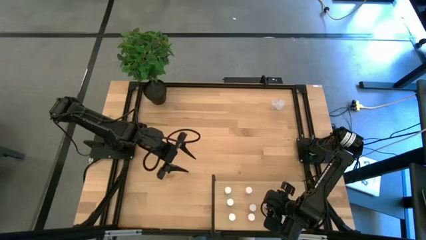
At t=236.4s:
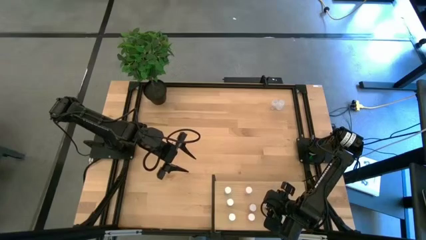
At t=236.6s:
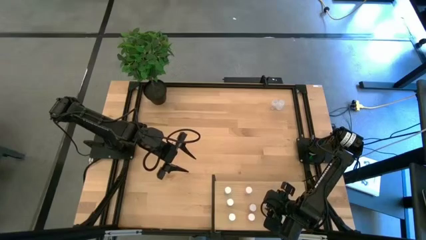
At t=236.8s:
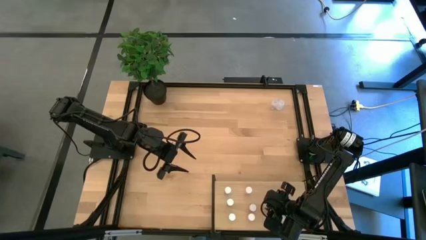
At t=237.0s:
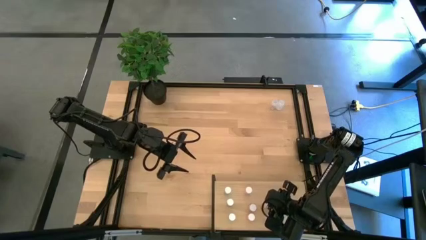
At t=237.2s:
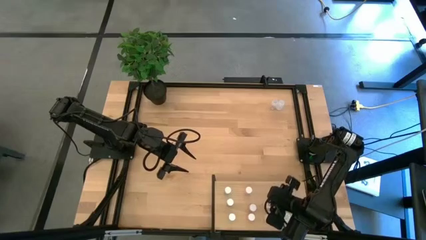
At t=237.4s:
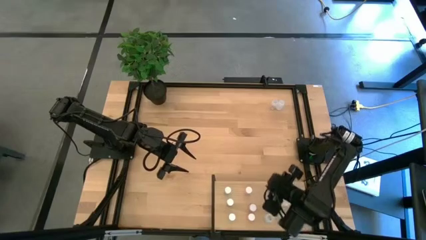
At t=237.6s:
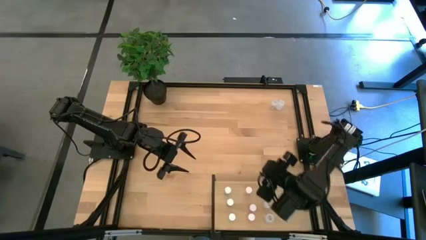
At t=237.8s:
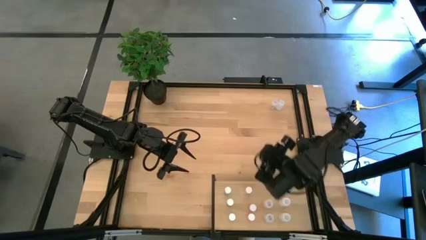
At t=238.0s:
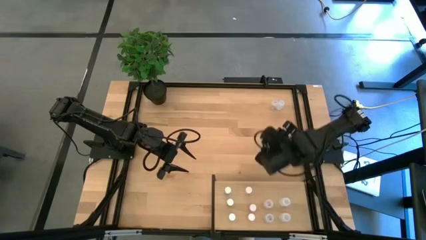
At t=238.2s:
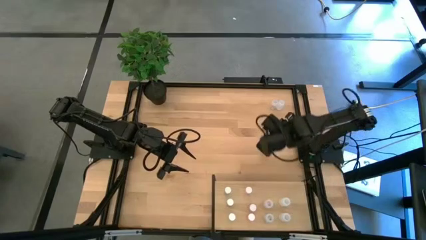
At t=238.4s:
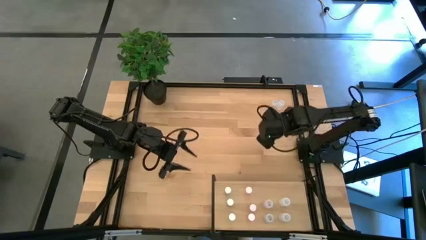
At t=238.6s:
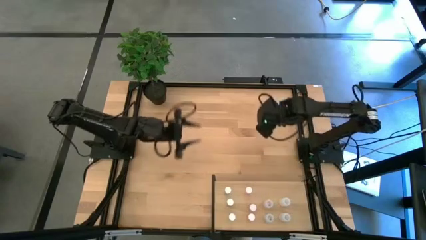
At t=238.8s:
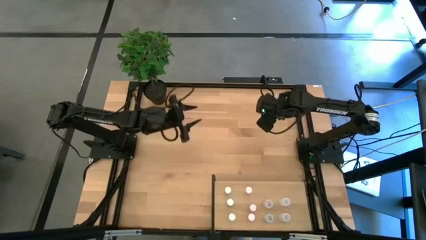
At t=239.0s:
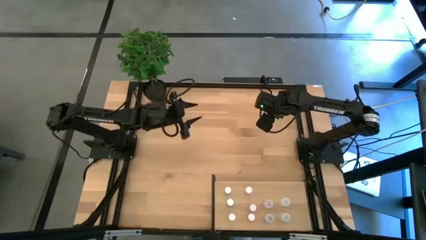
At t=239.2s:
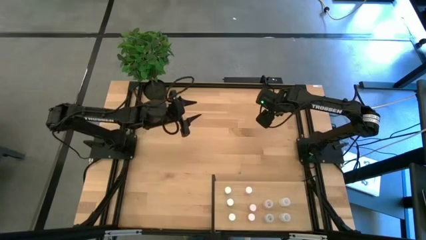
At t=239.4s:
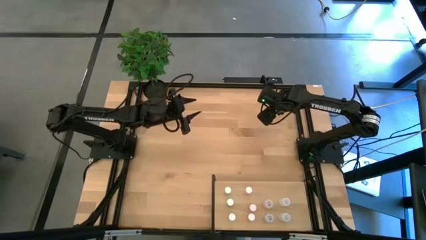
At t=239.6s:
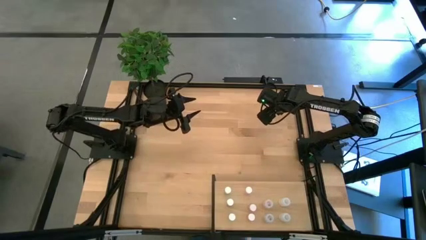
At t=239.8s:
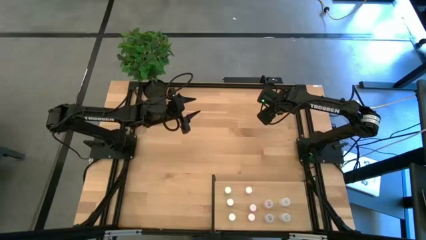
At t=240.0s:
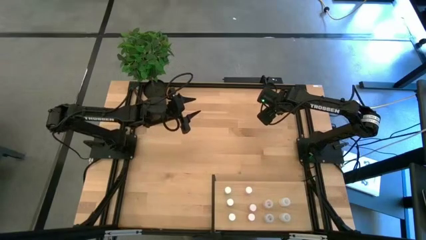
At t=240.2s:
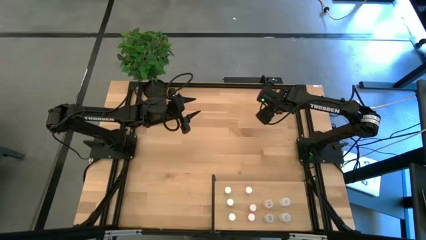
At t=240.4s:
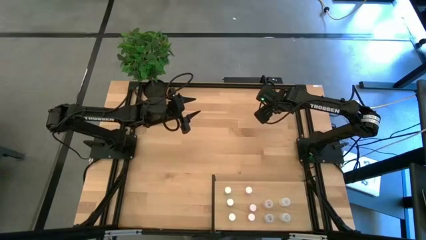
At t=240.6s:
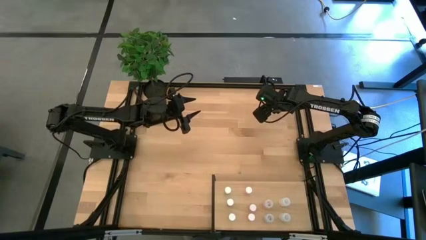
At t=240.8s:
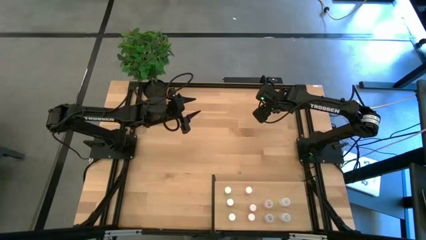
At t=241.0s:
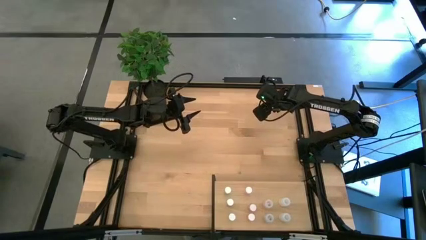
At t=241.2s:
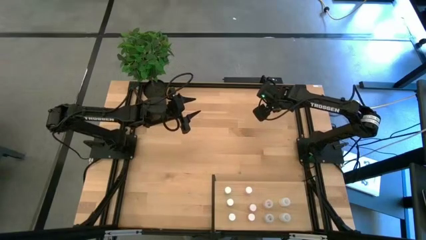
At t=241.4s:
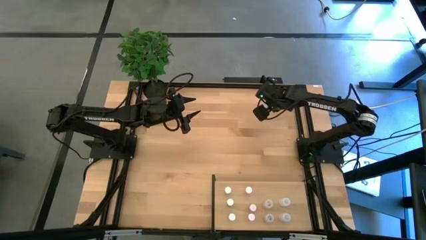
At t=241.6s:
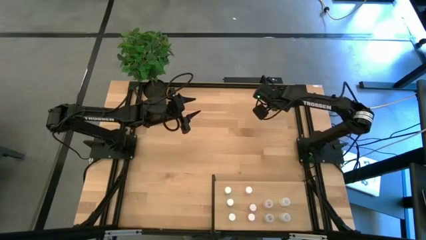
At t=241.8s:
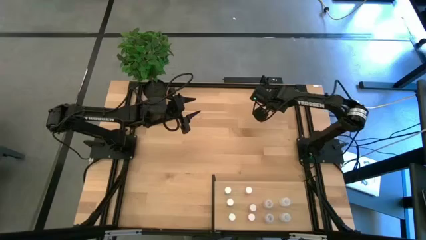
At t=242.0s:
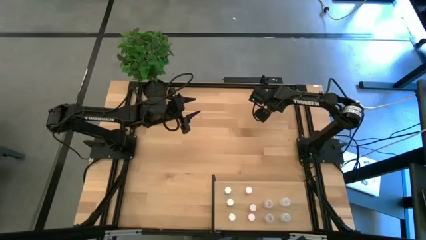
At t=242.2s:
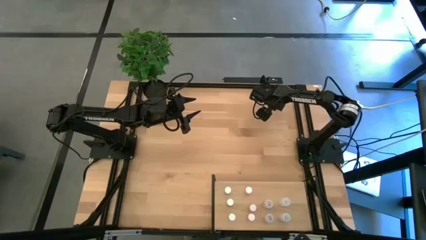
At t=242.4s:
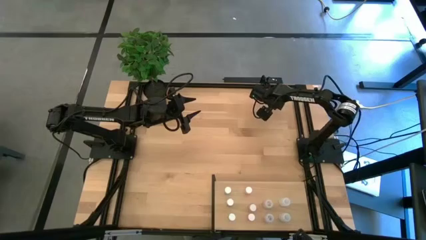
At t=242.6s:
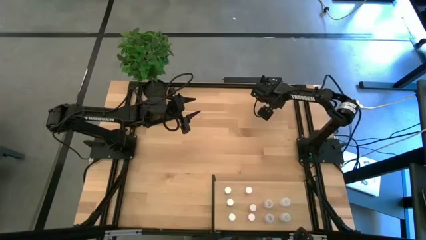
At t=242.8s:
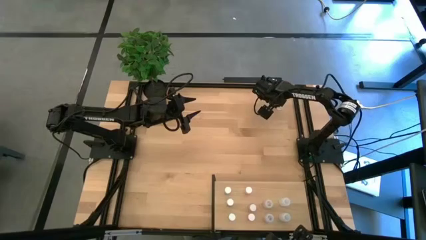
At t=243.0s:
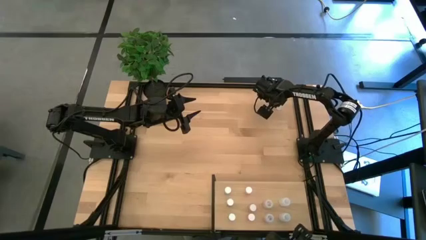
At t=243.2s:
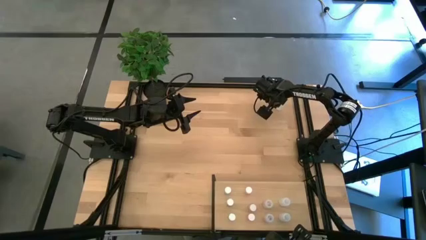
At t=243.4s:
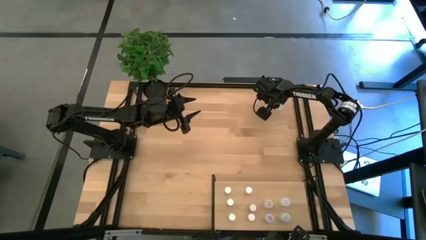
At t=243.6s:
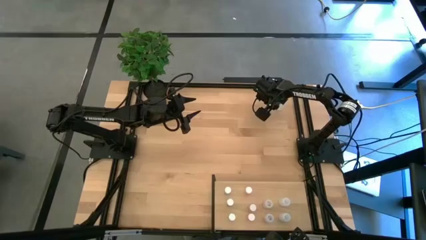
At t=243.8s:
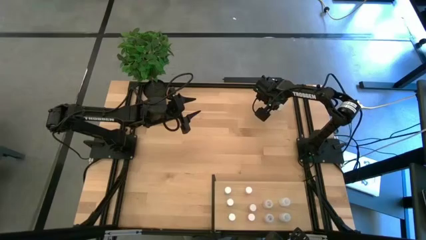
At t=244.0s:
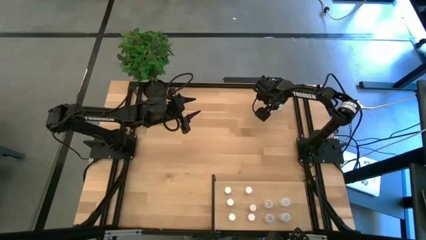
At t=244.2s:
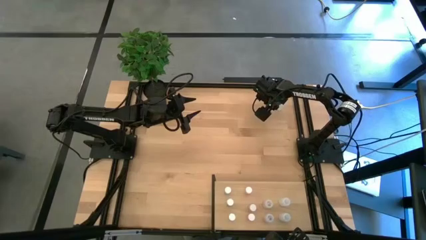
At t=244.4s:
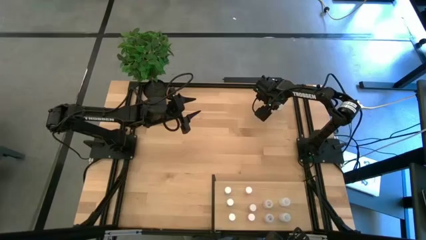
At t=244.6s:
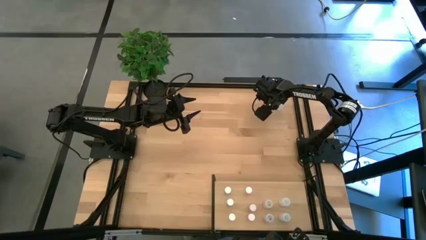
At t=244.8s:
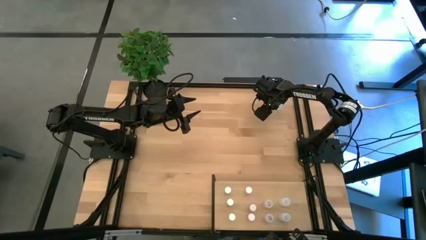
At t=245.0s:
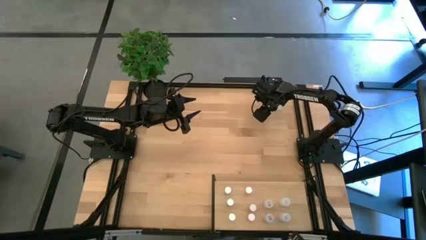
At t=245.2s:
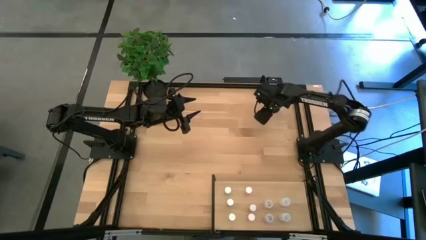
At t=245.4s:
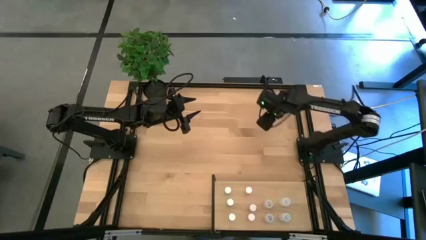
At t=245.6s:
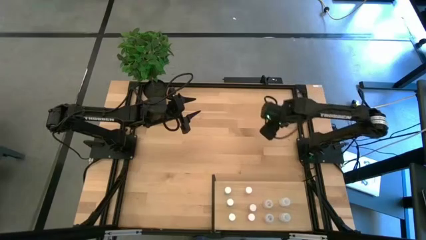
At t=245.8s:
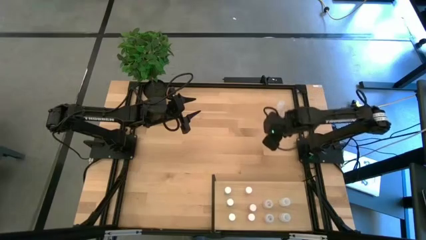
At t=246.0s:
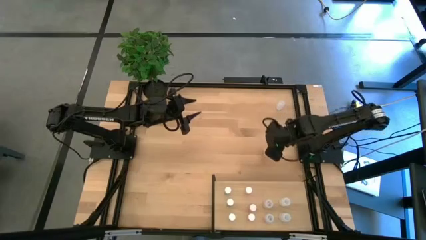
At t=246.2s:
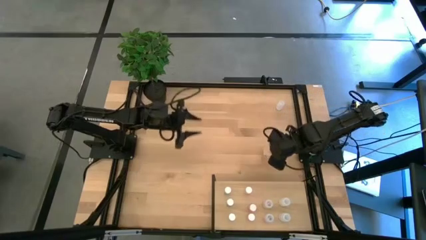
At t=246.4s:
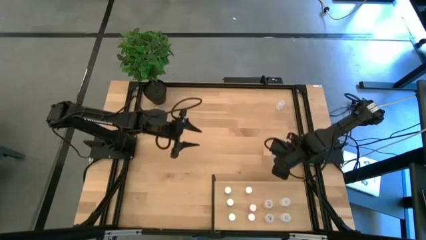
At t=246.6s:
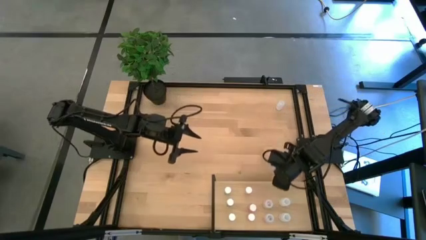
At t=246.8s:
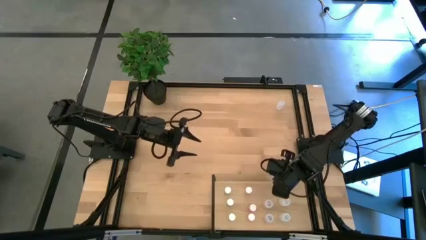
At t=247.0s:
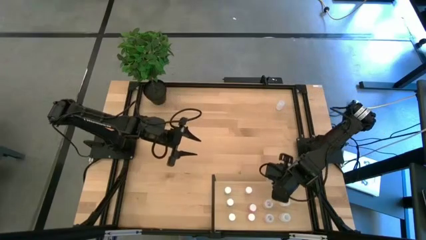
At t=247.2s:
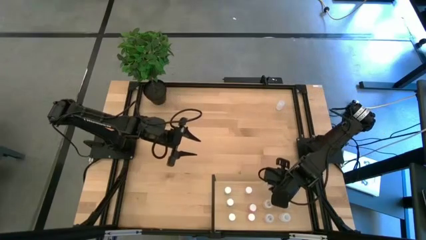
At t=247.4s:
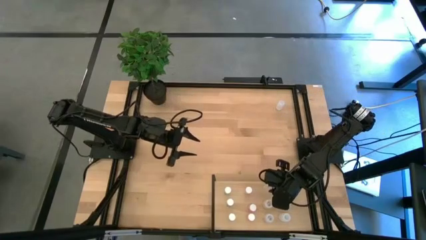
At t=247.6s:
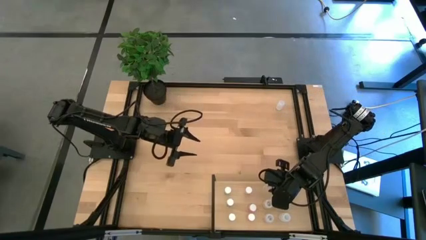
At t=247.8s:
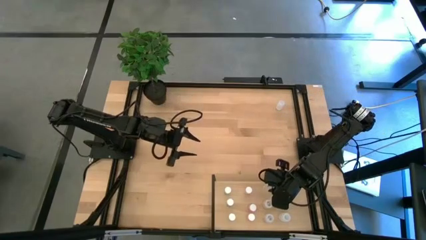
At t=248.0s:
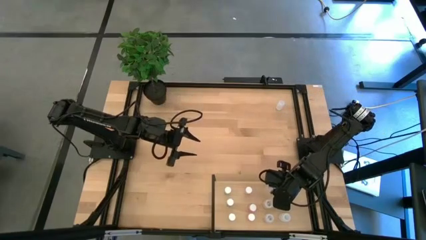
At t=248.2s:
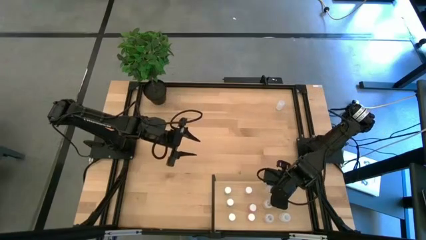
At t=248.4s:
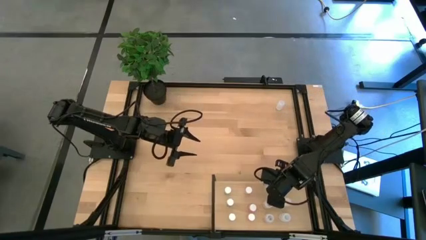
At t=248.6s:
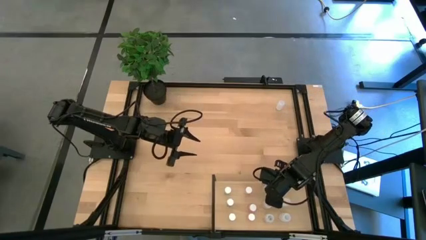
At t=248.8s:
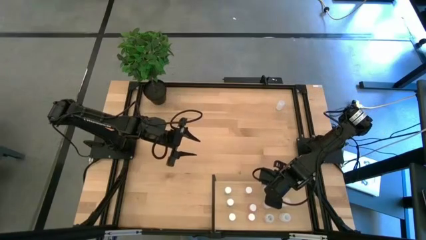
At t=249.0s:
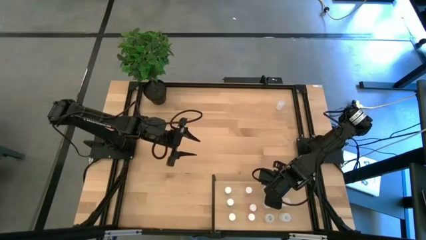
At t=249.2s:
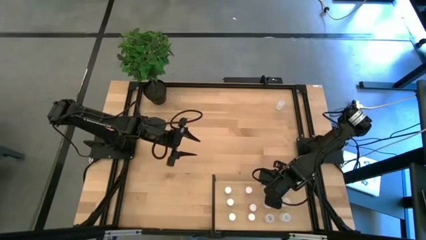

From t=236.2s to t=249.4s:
Task: Pick and place medicine bottles onto shelf by color
Put the transparent pill bottle on the shelf aligned with the other transparent pill bottles
